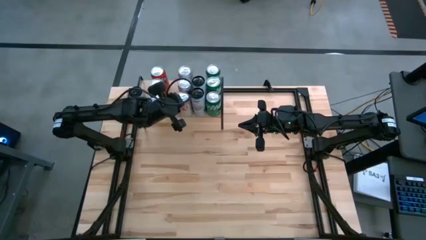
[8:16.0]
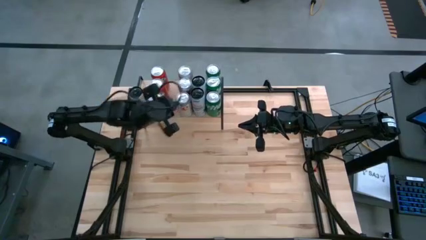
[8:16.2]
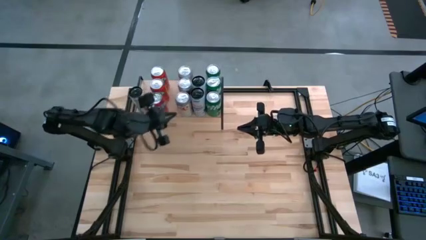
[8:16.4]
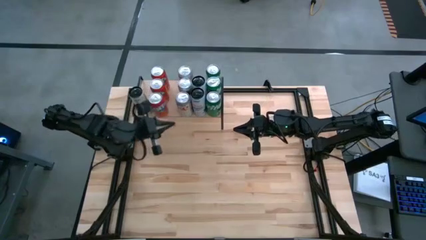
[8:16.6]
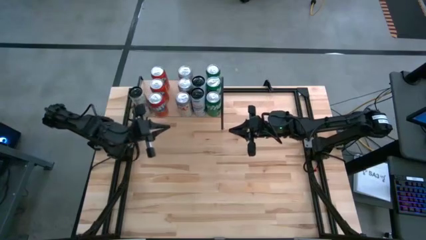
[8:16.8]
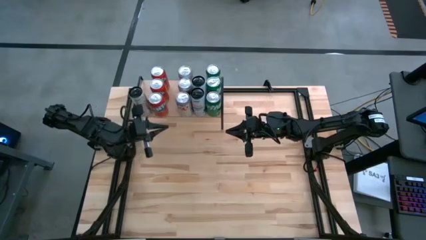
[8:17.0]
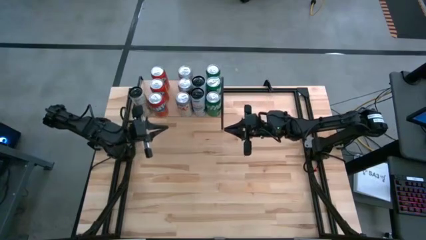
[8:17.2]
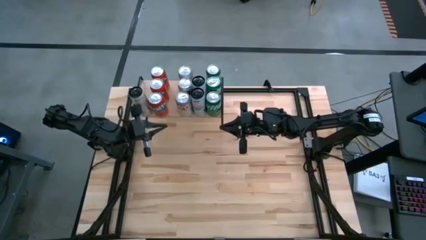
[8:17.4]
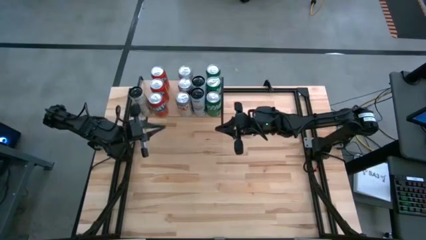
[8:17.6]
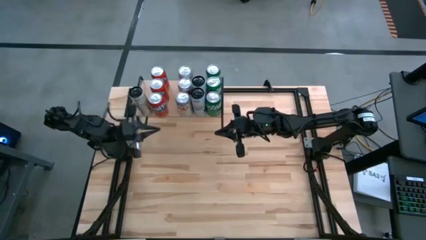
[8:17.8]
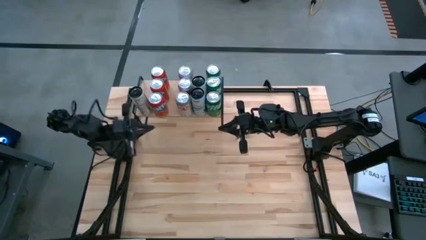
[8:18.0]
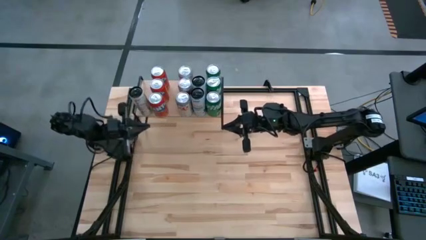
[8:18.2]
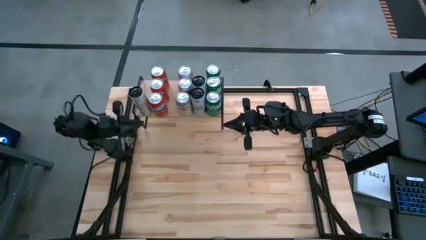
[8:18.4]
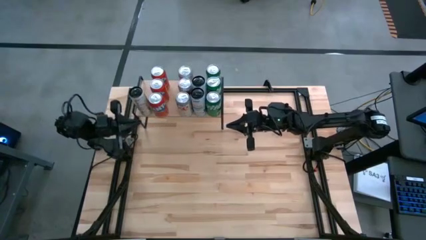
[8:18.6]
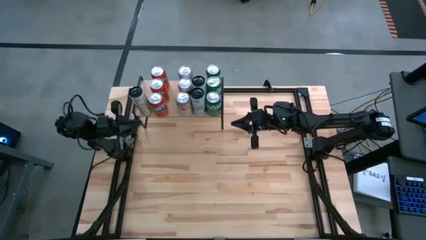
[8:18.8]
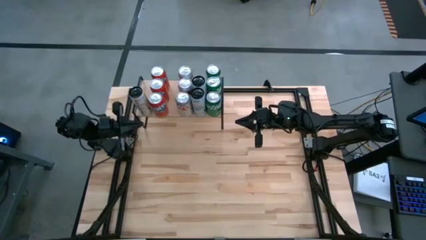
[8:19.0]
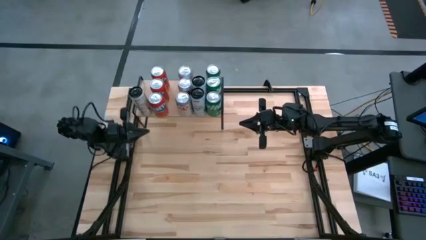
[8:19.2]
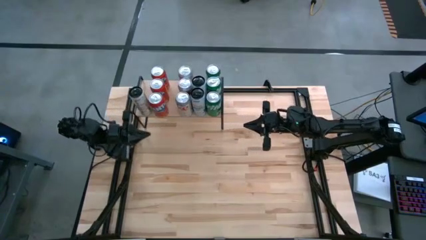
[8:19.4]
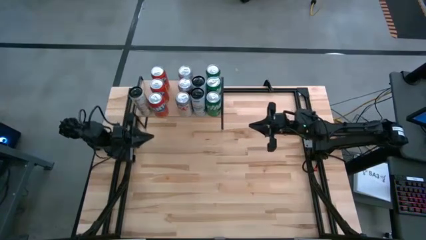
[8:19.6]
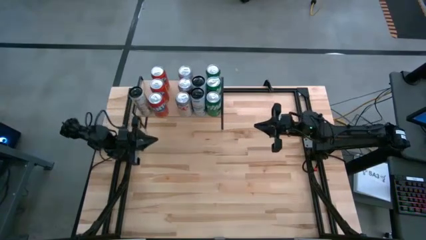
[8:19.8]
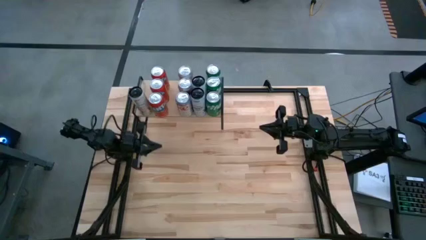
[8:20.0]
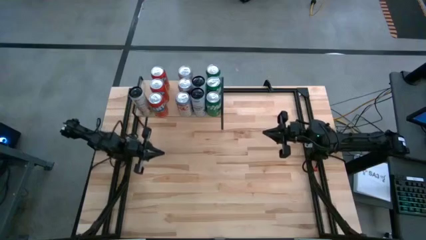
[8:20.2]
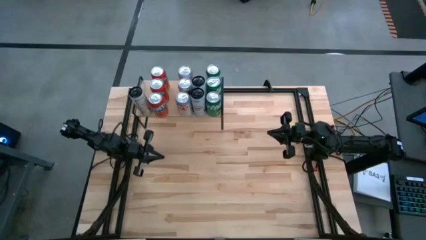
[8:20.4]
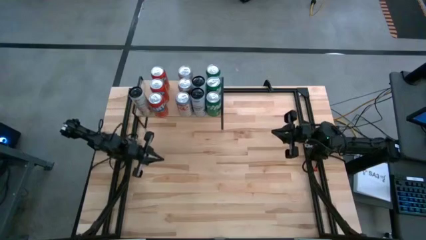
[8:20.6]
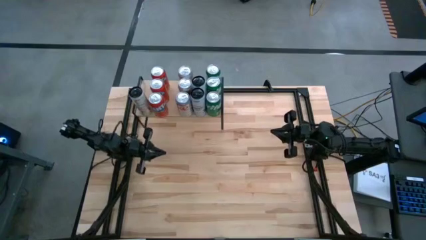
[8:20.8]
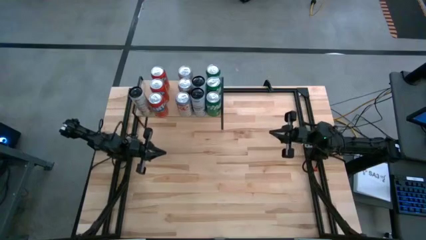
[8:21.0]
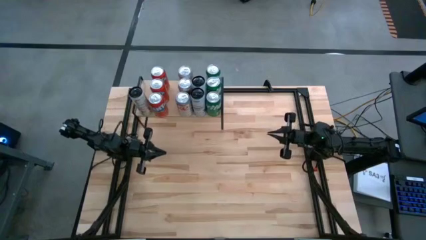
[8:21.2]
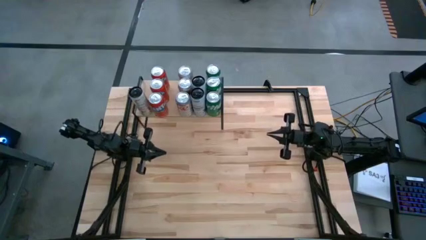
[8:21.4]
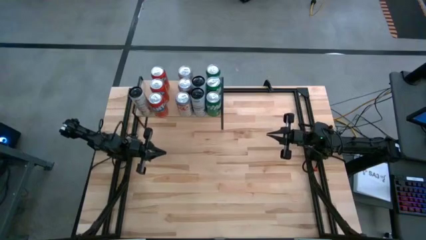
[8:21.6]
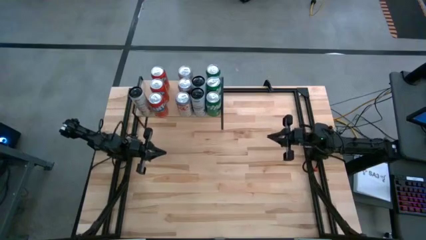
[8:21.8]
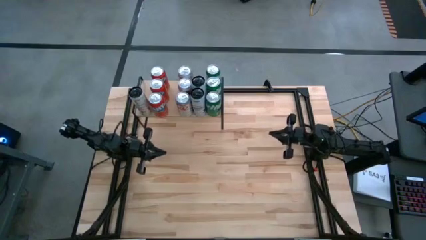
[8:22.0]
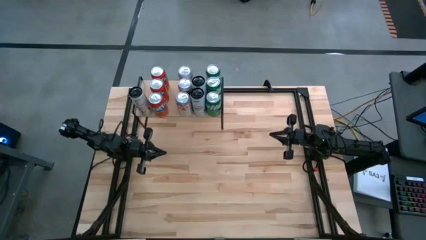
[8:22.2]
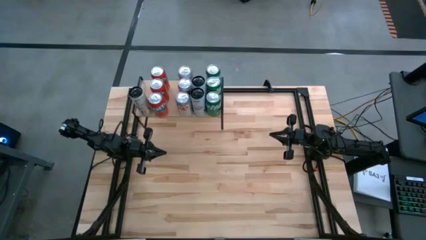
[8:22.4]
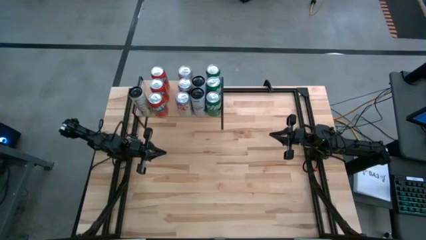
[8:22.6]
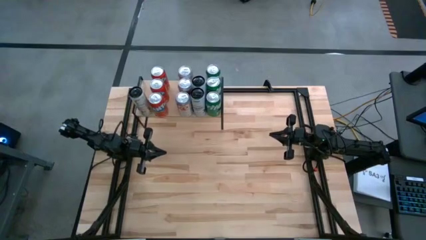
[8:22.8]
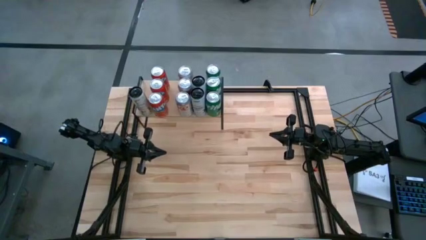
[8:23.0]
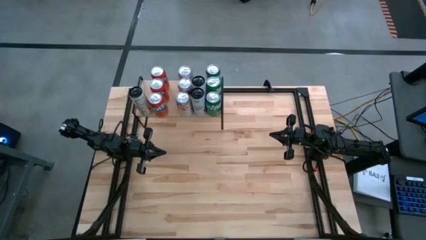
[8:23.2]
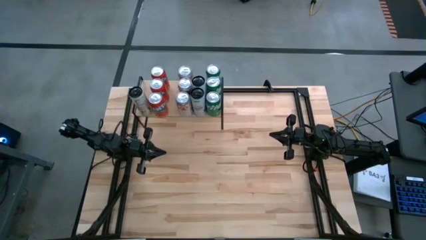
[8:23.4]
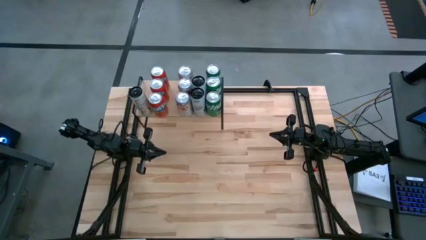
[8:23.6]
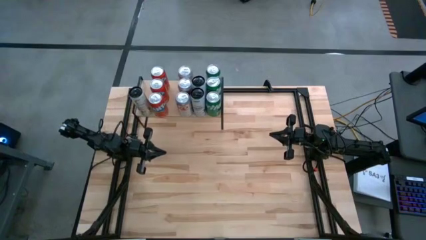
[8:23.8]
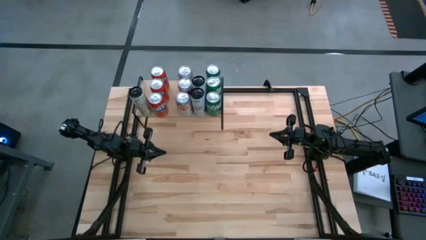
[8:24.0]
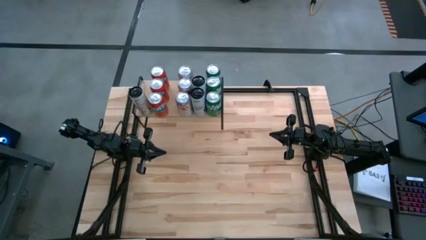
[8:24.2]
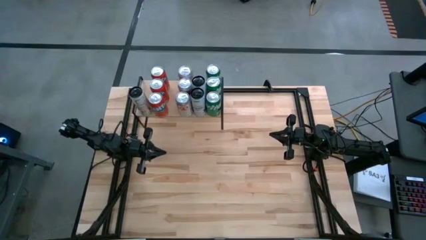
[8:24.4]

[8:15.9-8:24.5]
Task: Place canned beverage on shelf
Return to Home Position

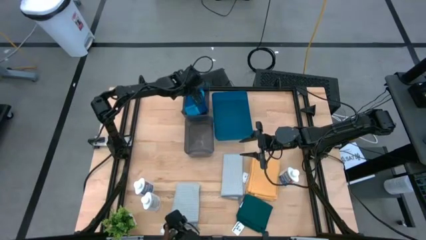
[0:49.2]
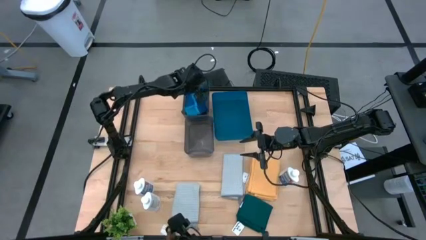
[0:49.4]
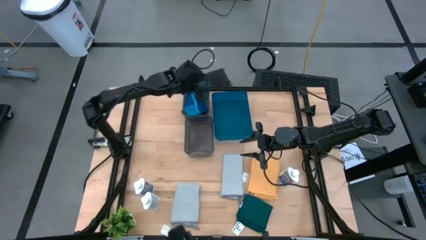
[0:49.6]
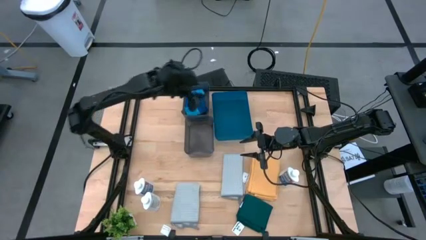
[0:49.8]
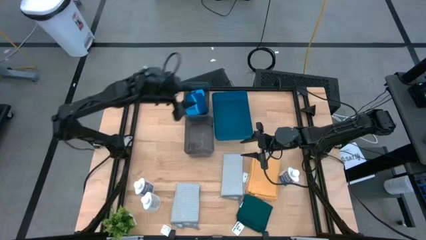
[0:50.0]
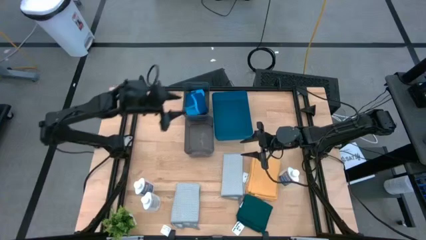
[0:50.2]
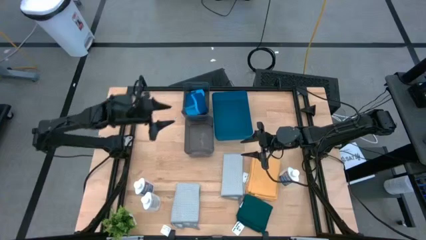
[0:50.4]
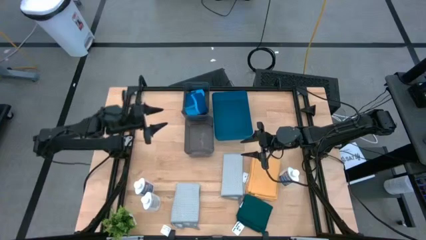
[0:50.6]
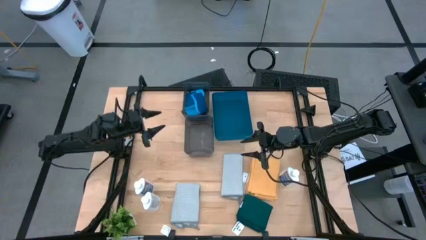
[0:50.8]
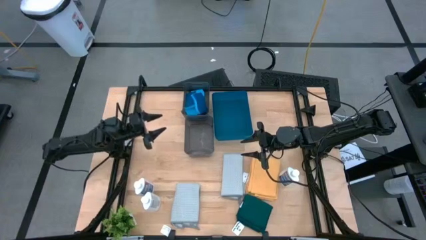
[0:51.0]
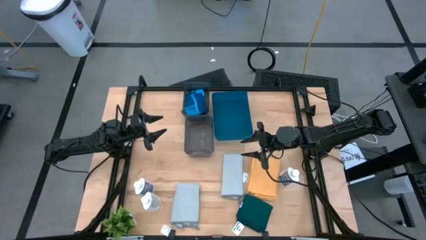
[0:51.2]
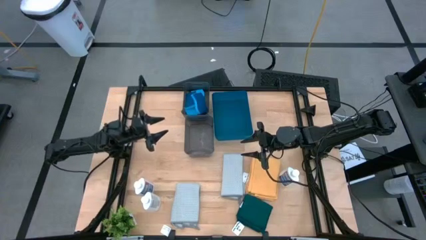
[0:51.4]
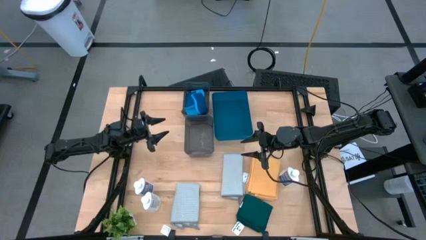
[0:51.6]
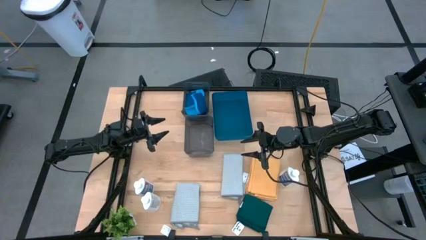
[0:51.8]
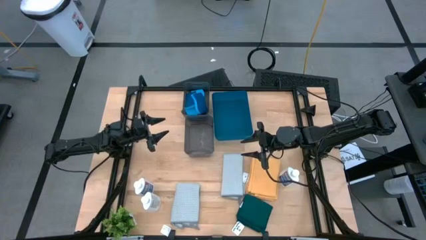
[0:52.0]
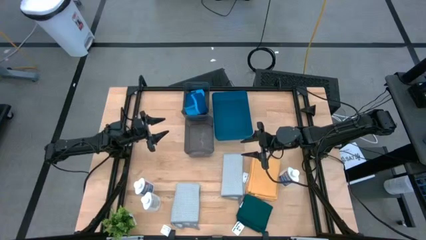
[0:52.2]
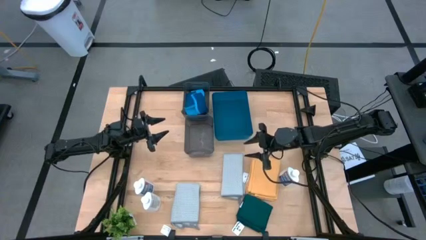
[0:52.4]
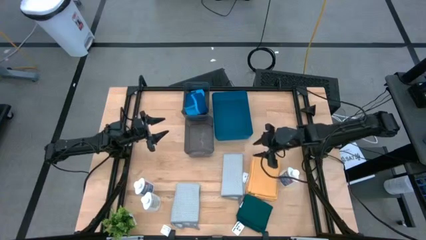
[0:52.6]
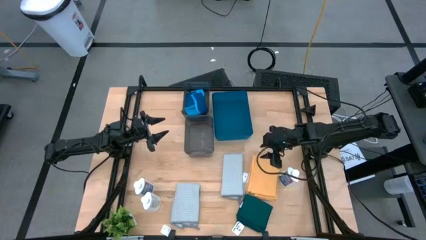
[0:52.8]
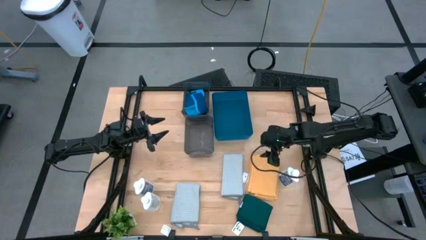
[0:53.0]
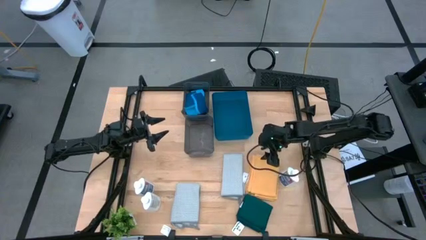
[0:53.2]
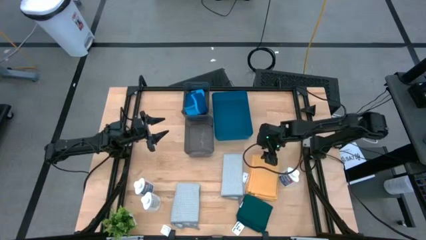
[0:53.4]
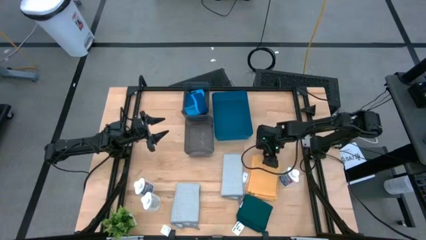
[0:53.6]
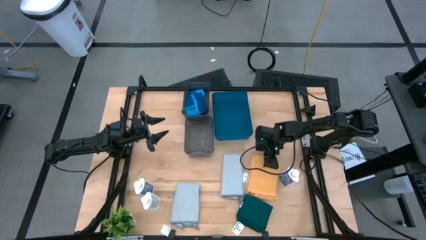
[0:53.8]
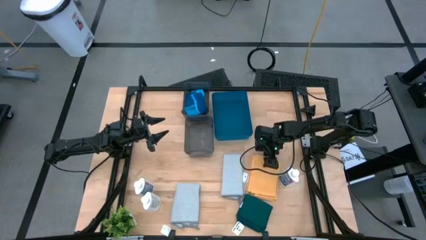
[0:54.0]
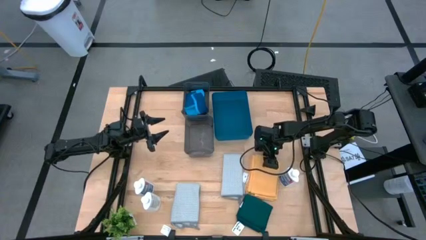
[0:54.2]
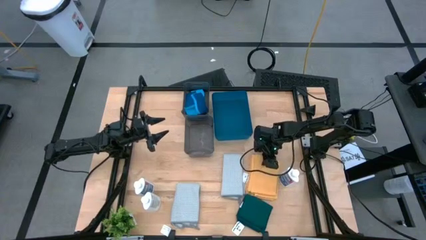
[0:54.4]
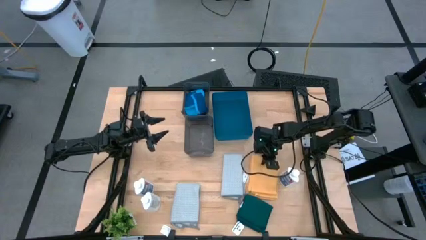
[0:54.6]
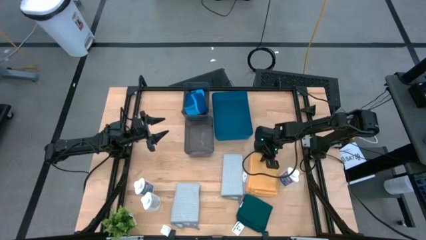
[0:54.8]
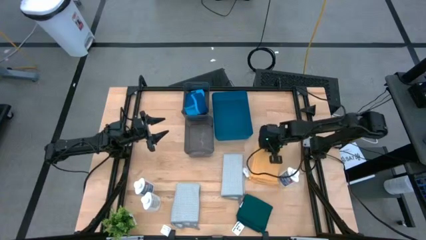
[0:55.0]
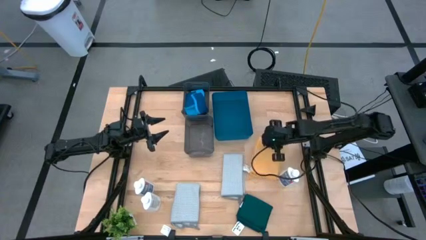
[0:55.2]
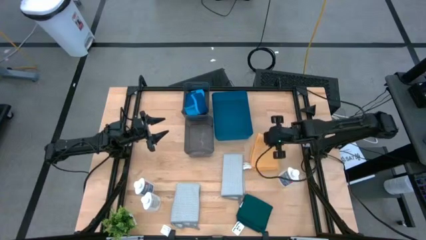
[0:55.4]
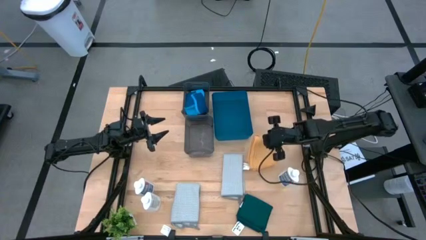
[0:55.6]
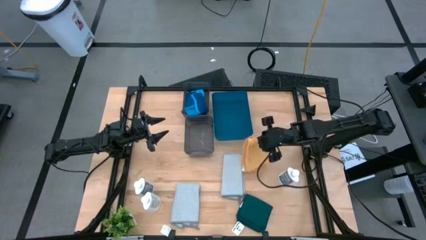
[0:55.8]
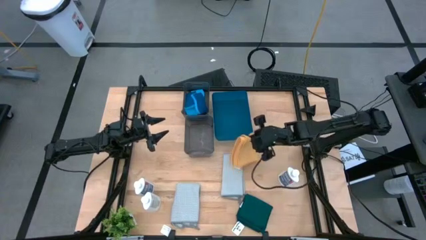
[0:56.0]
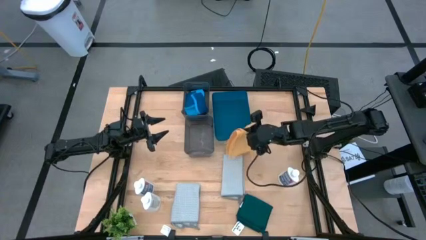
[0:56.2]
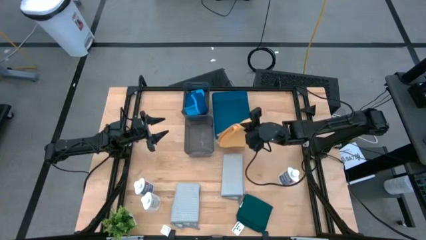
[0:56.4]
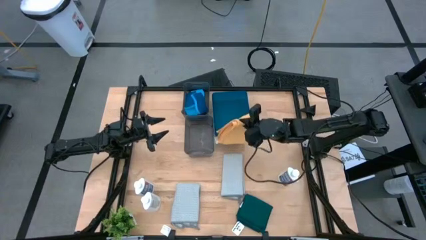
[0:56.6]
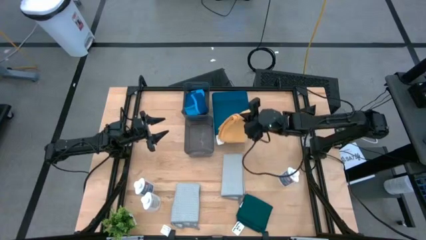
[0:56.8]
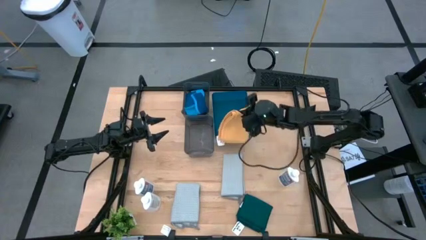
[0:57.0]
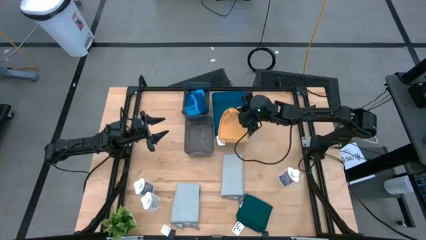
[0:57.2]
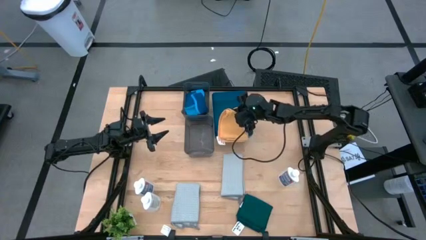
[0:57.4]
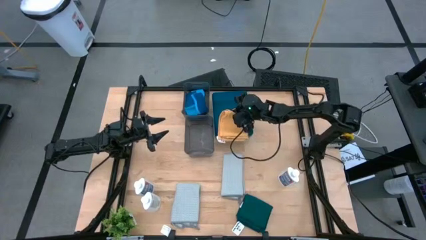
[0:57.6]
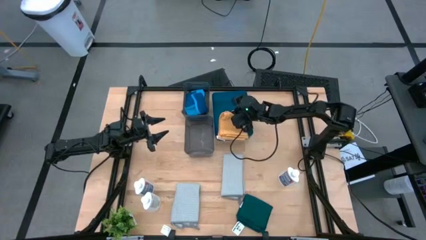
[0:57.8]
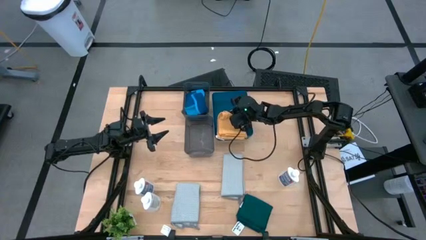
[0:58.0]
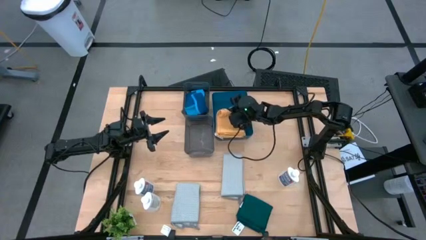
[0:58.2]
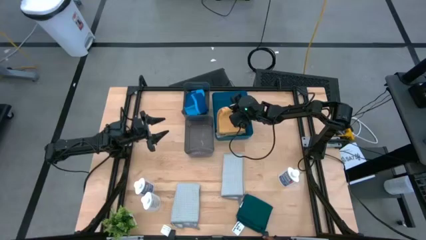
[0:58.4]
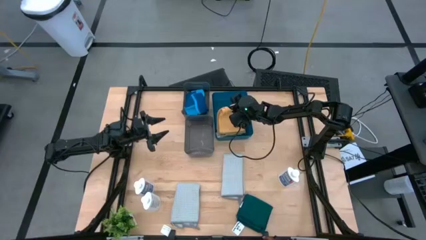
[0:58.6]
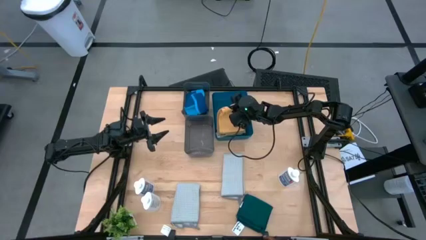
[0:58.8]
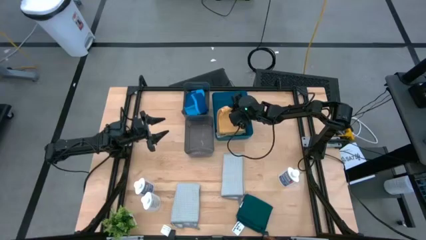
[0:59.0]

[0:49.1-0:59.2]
Task: Pick & Place Kitchen Items
Put the yellow towel into the blue bin
